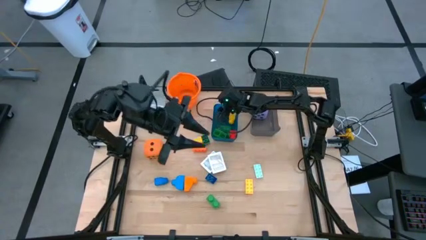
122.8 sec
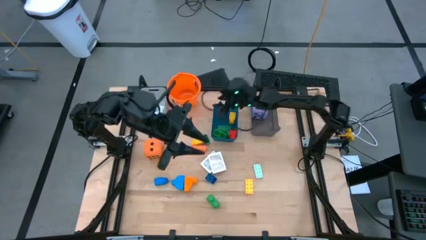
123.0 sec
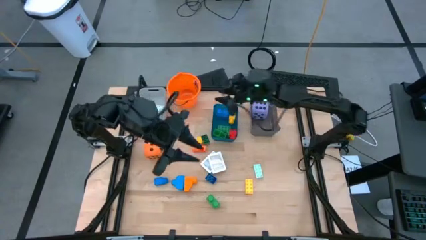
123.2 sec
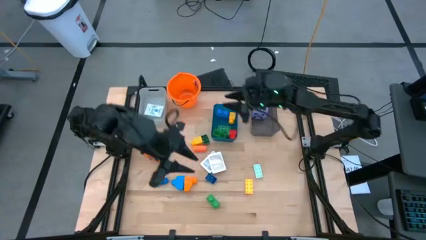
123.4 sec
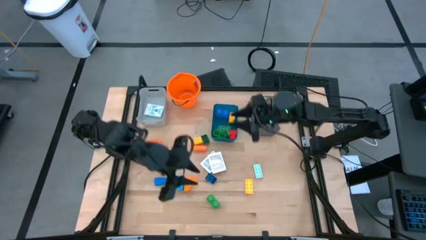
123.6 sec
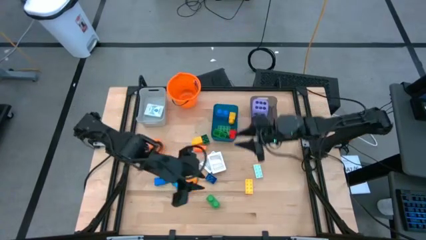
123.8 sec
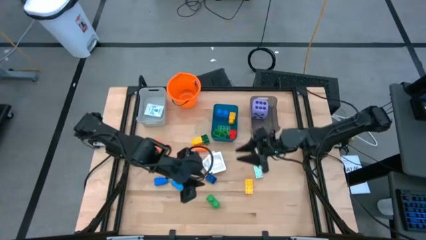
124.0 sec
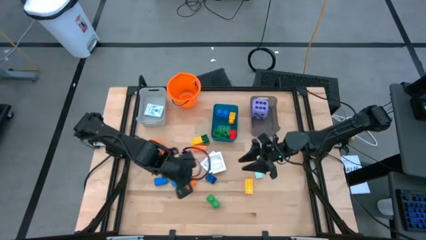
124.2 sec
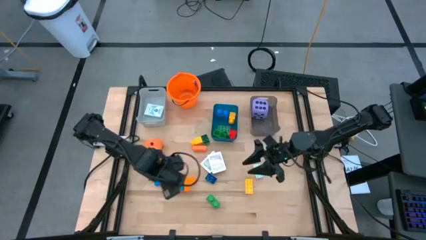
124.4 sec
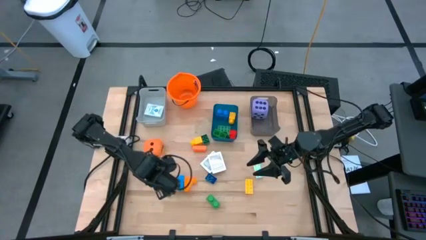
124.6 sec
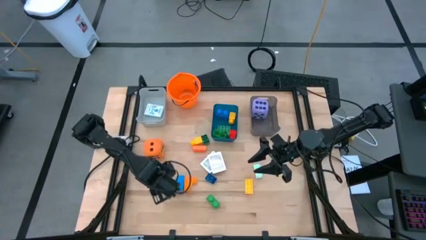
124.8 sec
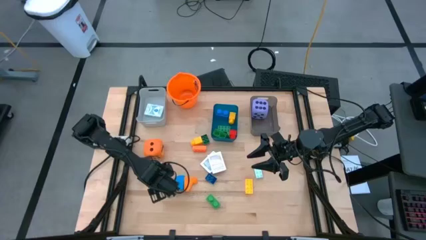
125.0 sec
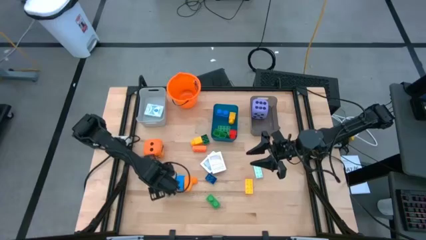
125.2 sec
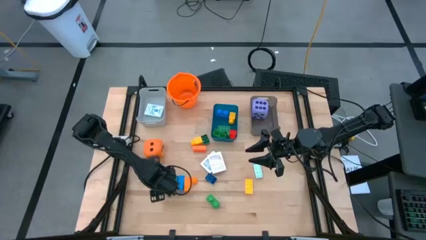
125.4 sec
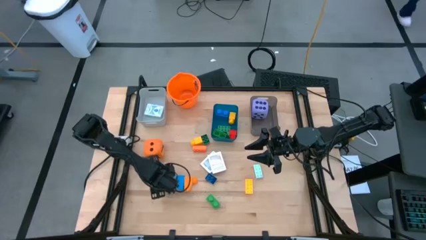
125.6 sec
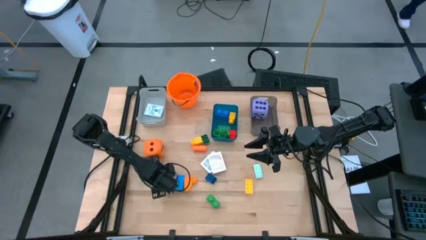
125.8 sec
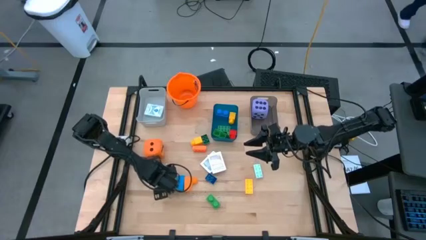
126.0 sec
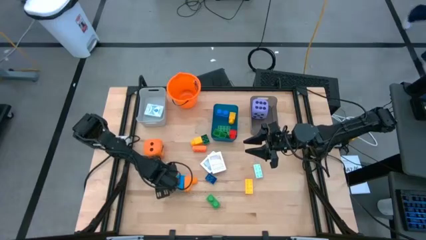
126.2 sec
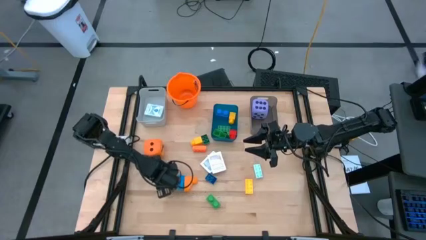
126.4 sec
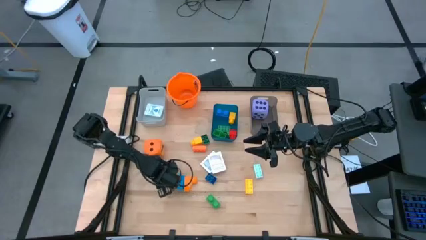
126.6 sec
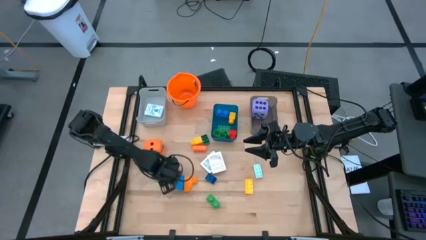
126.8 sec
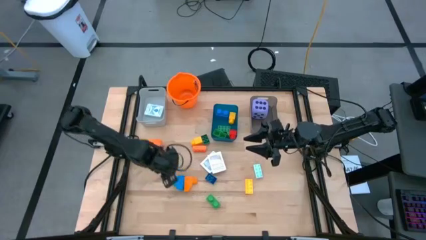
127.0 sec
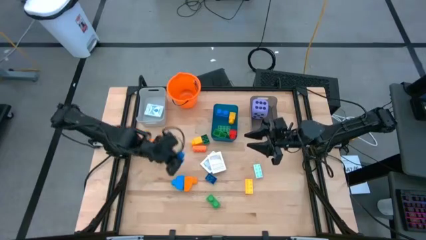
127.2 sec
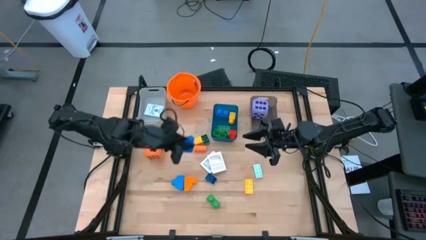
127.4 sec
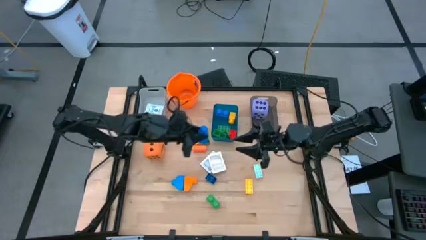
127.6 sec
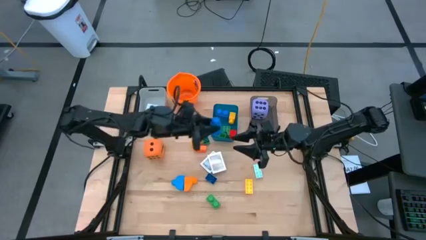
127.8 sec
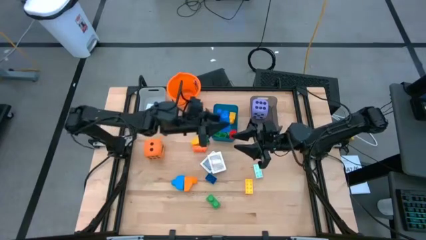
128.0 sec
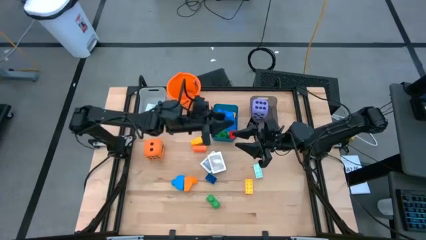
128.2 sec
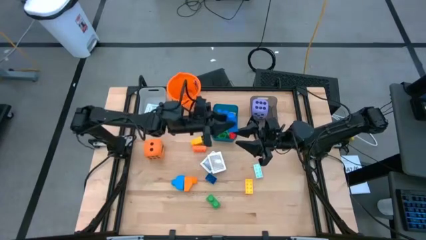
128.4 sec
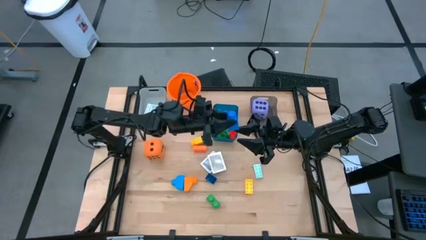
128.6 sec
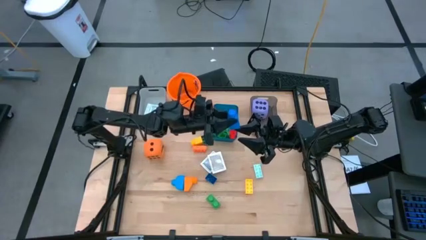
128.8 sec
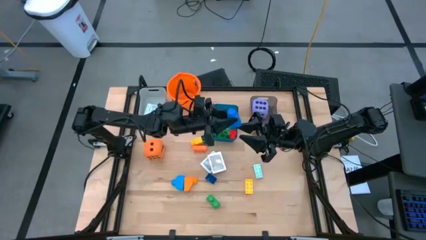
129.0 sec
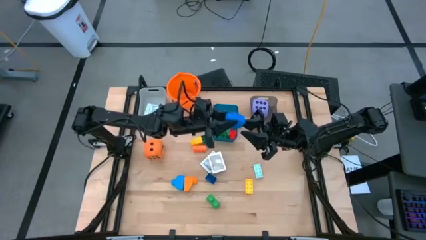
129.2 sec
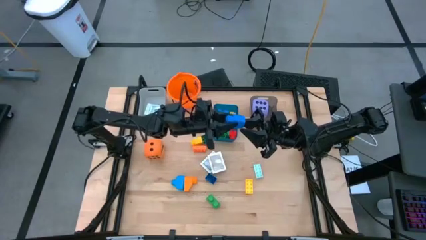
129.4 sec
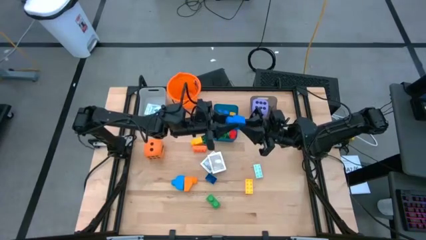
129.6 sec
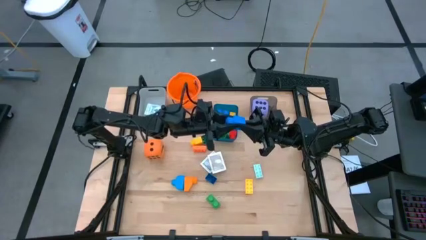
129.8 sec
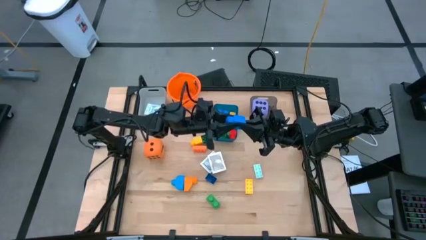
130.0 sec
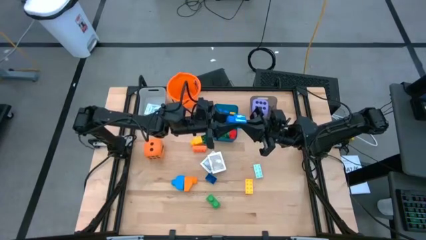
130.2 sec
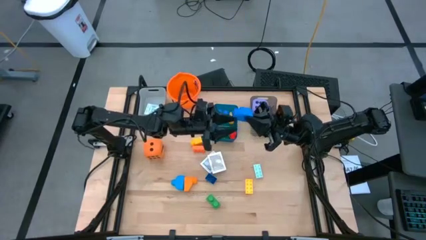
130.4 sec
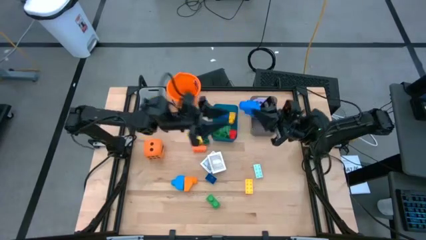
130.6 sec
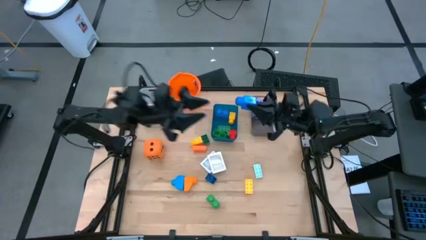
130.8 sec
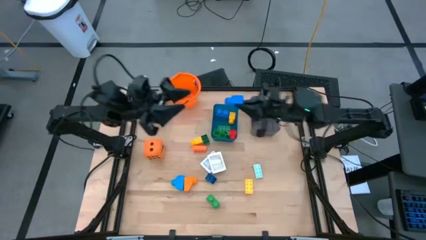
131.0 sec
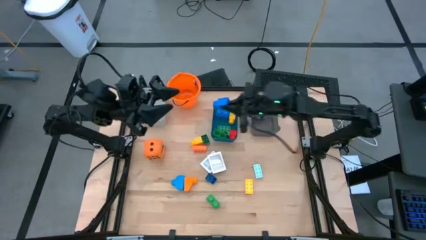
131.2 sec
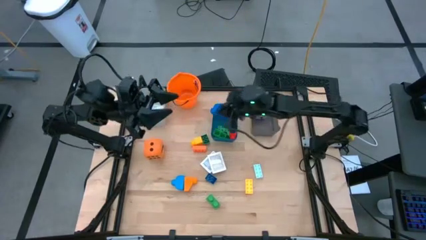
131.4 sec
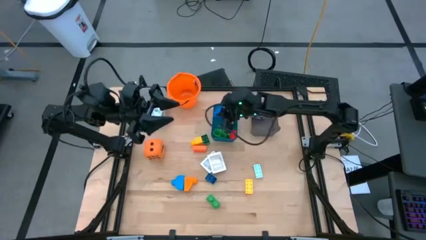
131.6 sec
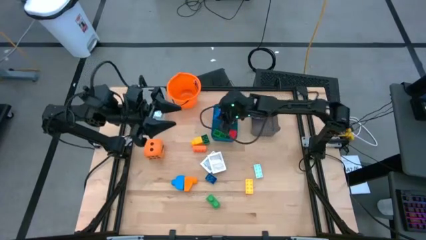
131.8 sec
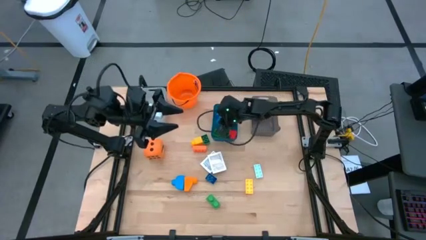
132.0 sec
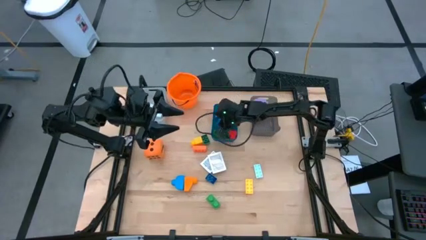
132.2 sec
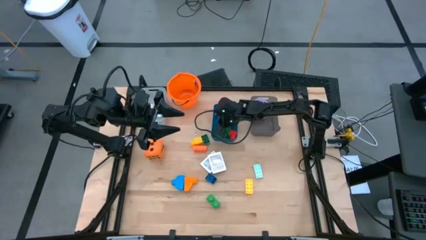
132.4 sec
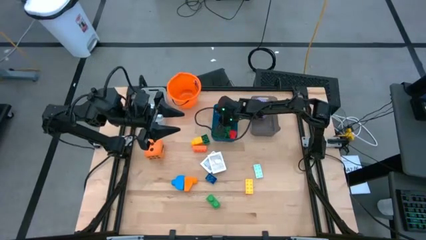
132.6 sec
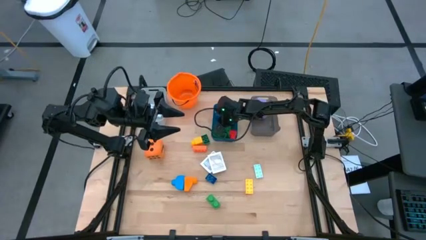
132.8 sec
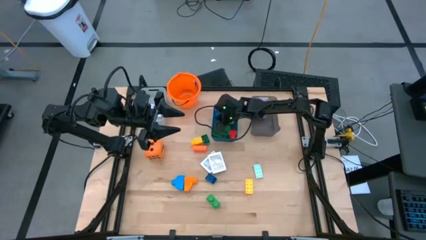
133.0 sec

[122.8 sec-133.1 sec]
Task: Pick & Place Toys
Put the blue game piece into the blue bin

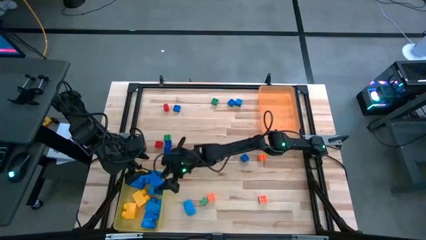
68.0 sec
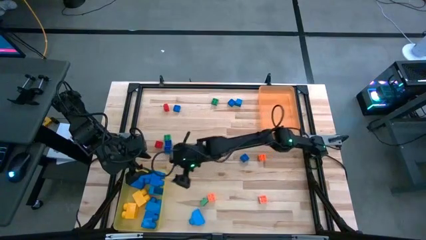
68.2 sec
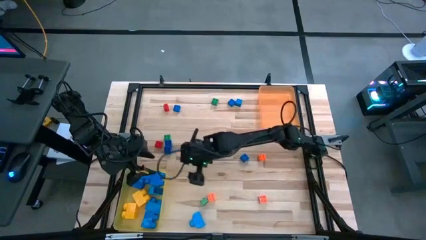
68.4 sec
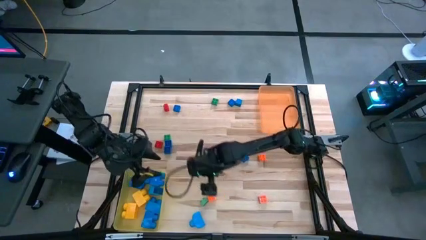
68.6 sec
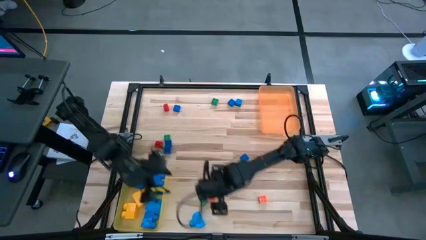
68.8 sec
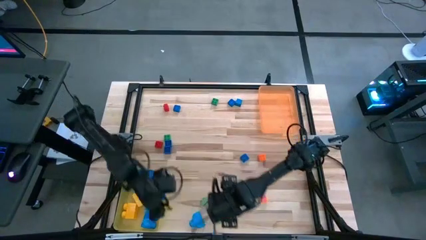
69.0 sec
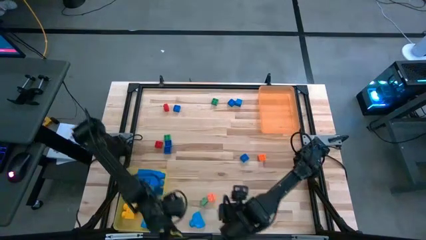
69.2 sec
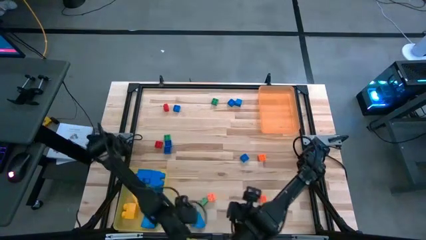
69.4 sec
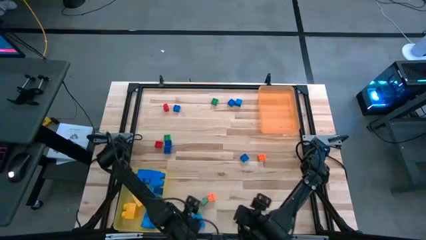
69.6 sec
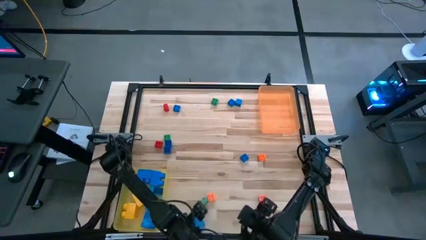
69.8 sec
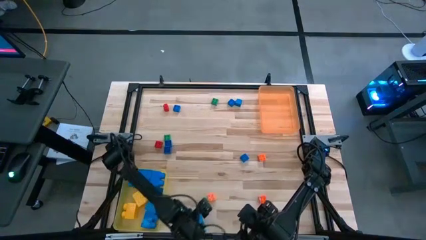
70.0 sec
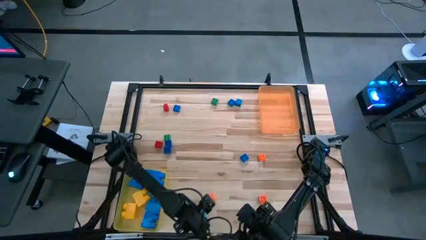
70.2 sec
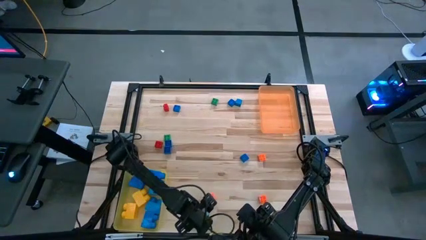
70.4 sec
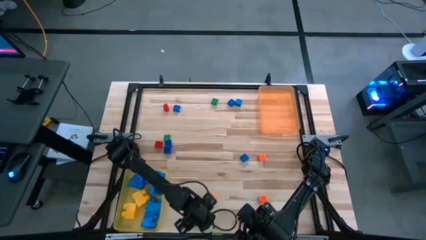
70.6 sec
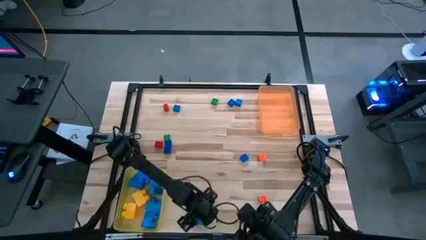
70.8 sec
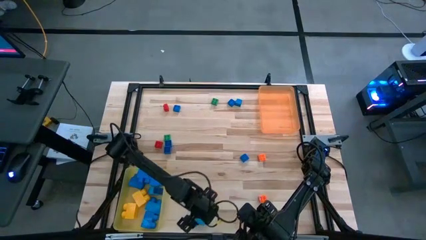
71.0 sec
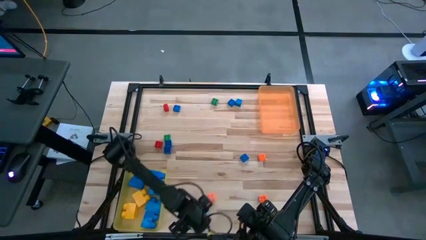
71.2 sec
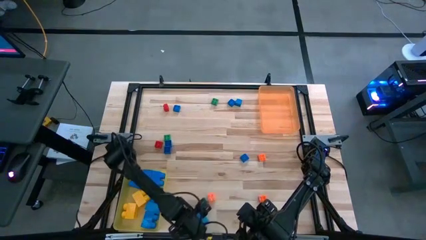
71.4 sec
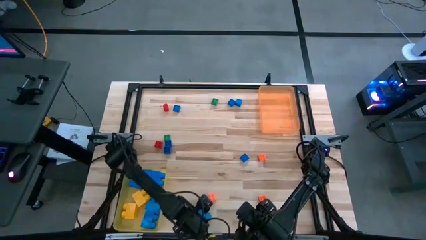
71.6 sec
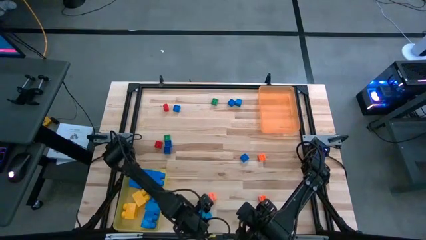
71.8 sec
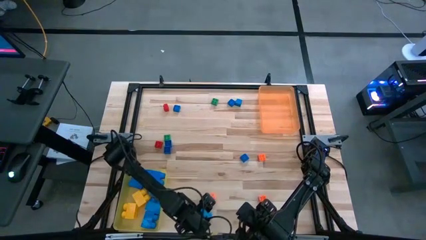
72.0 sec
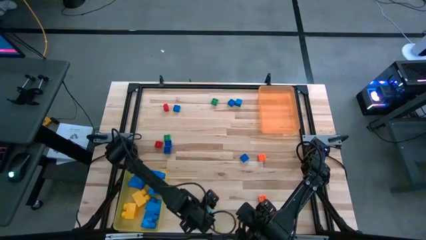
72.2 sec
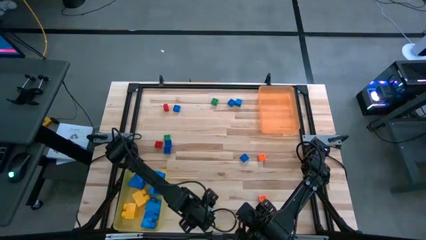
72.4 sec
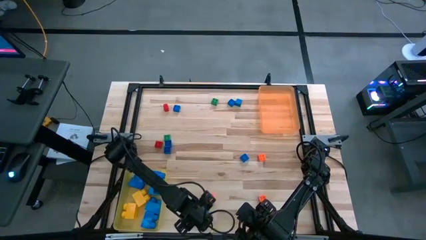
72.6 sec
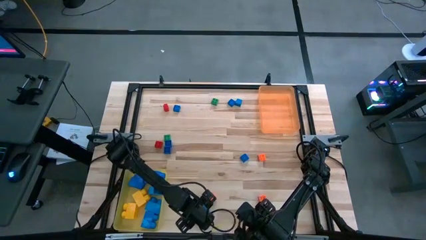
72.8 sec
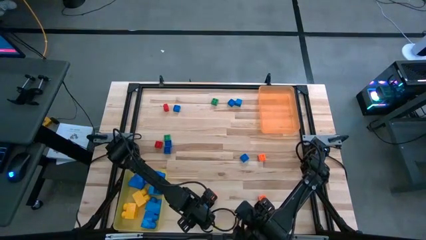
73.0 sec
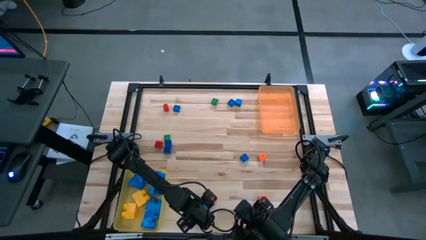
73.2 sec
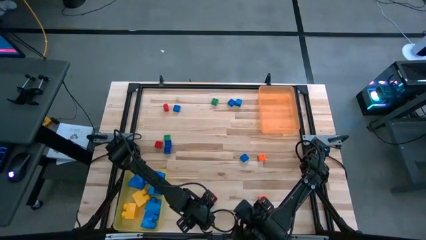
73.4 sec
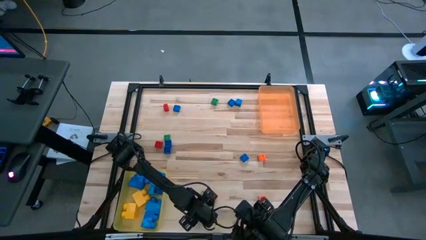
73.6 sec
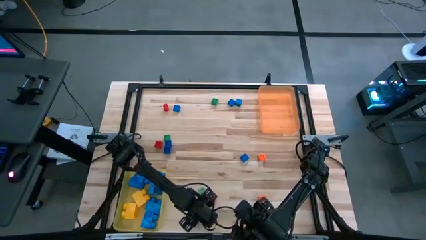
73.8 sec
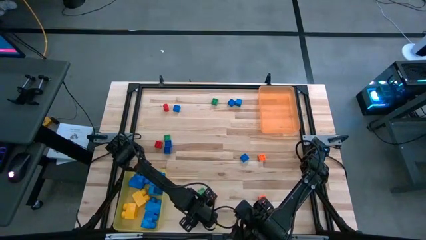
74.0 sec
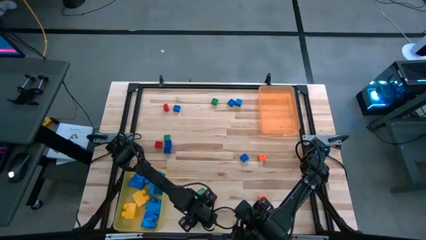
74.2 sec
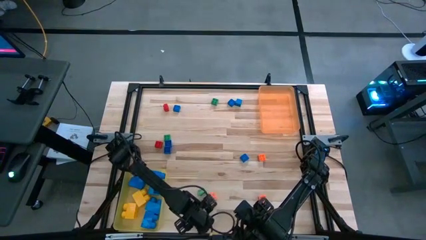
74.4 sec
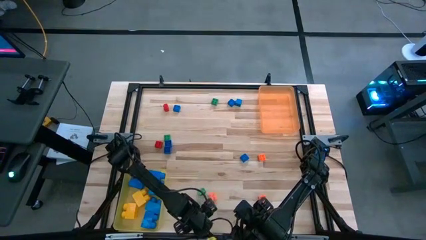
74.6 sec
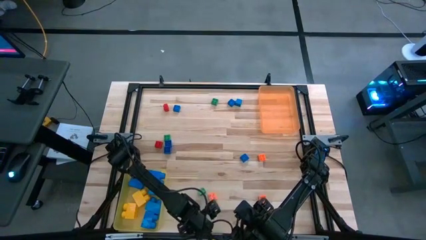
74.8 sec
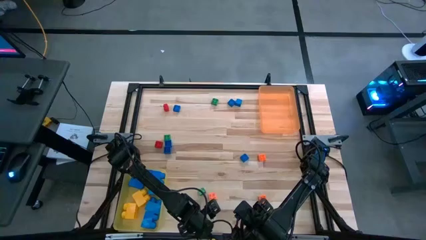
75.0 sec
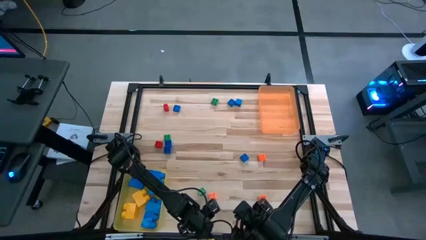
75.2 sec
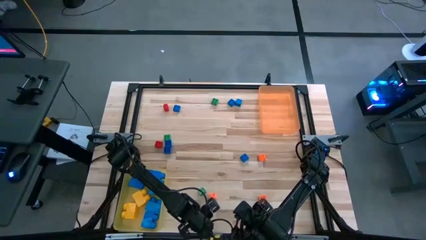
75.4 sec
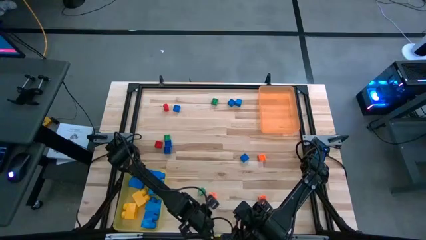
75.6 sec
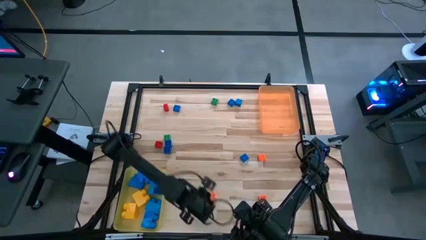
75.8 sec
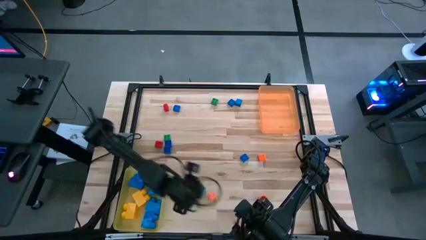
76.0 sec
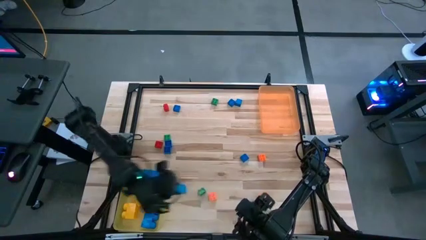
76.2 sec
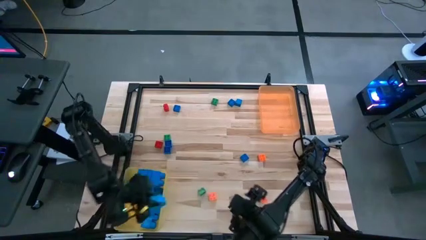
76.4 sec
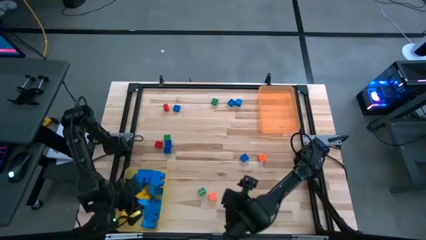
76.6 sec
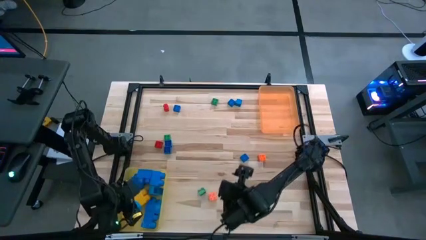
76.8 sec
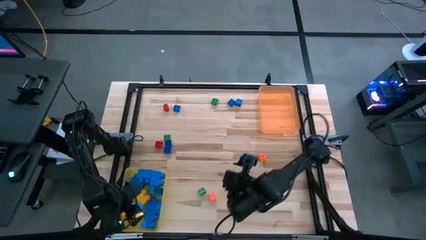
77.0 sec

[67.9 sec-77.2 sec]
Task: Sort blocks by size
Put the large blue game piece into the yellow bin
